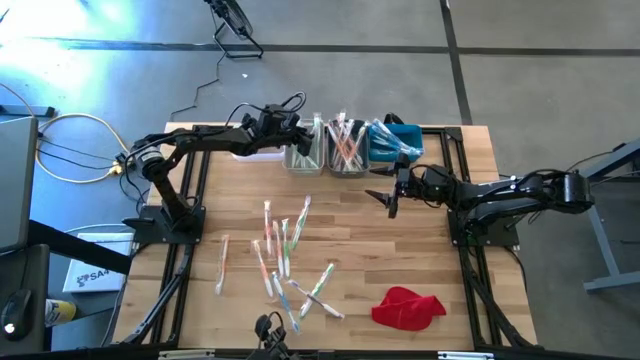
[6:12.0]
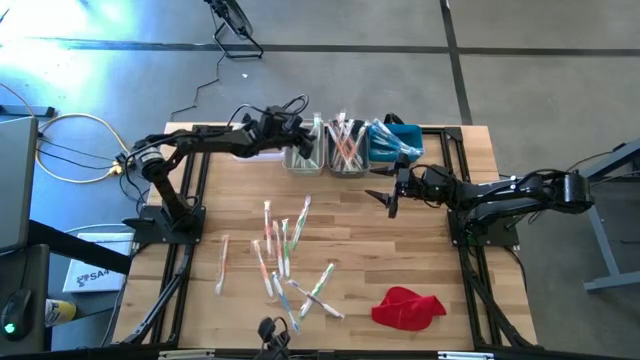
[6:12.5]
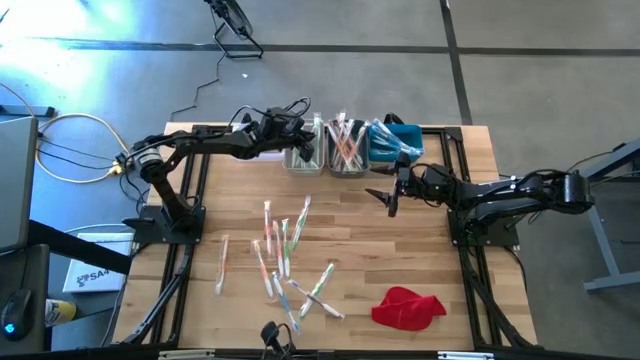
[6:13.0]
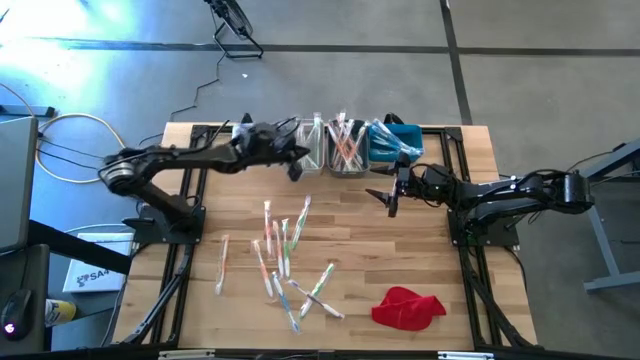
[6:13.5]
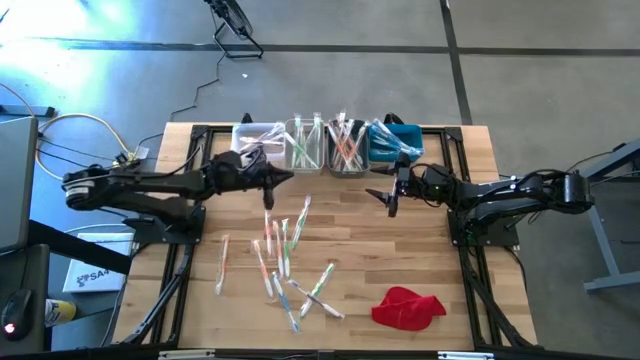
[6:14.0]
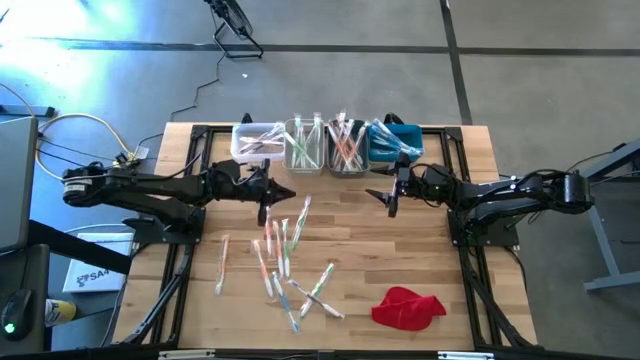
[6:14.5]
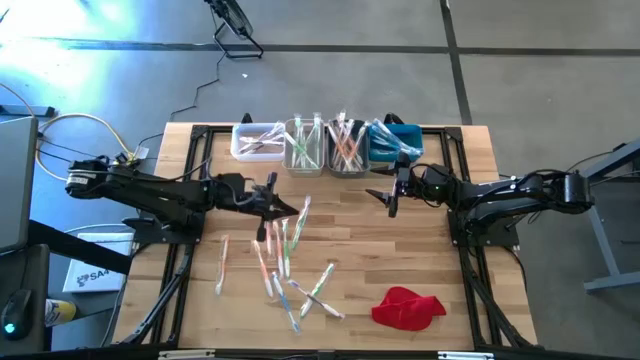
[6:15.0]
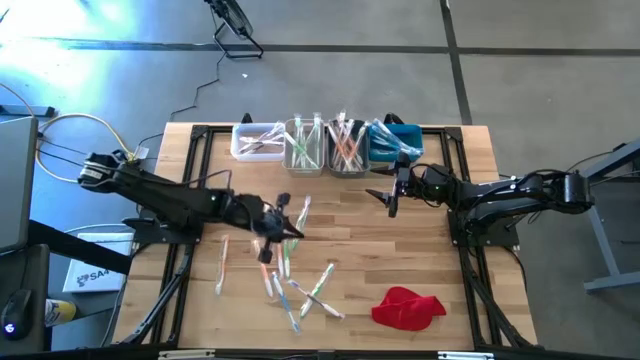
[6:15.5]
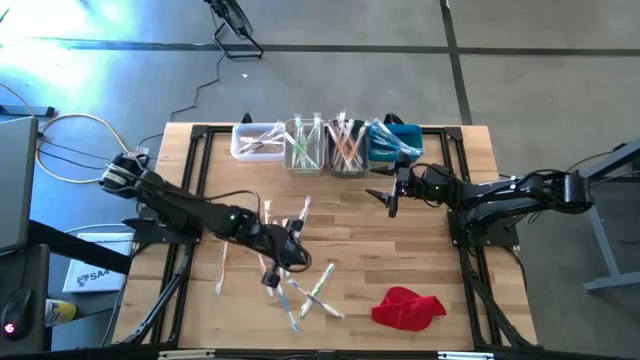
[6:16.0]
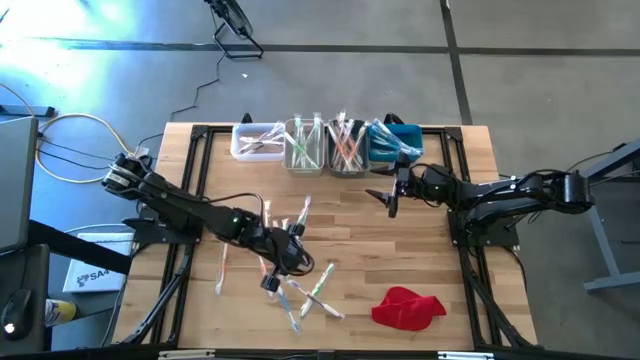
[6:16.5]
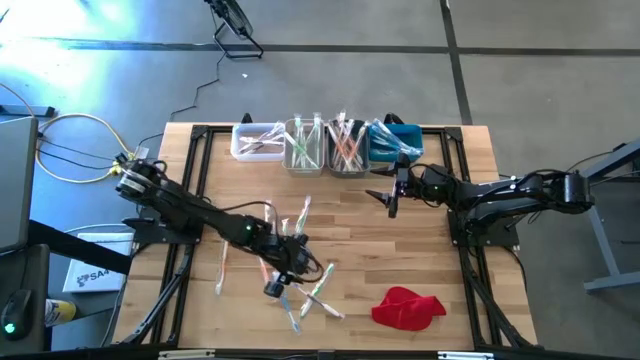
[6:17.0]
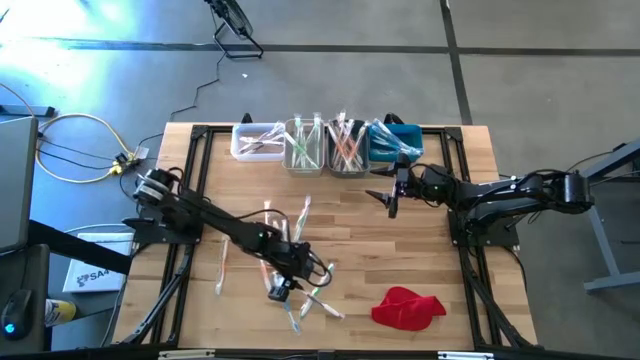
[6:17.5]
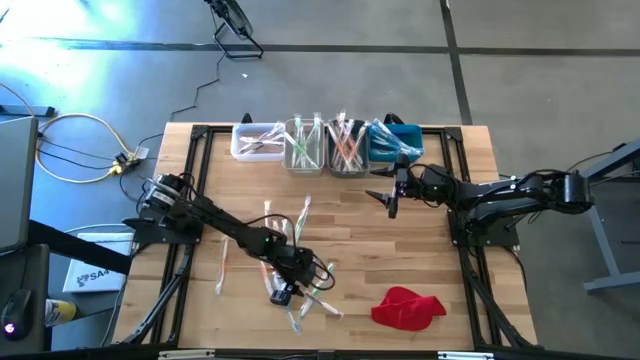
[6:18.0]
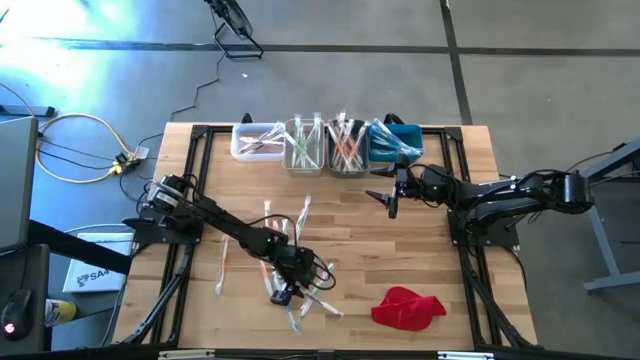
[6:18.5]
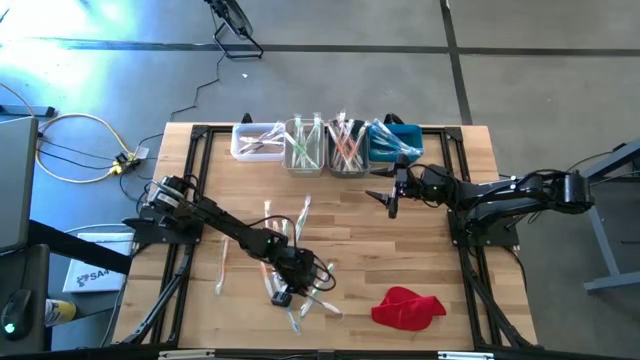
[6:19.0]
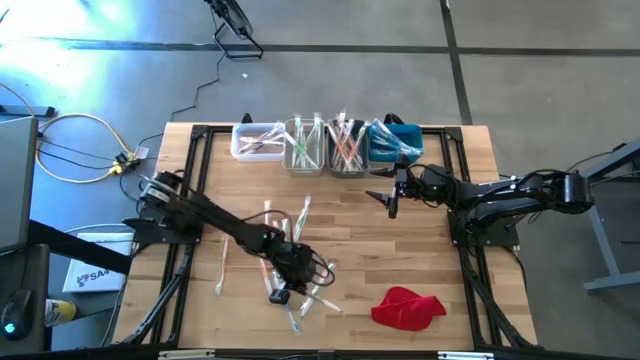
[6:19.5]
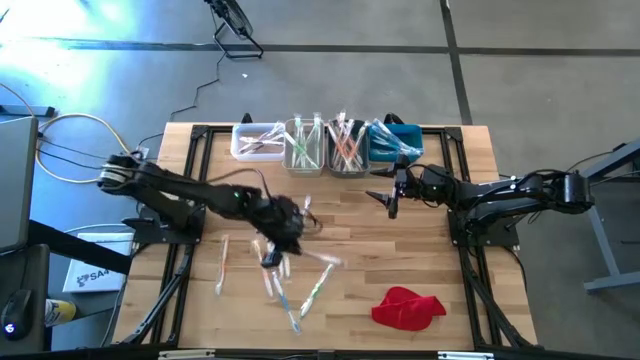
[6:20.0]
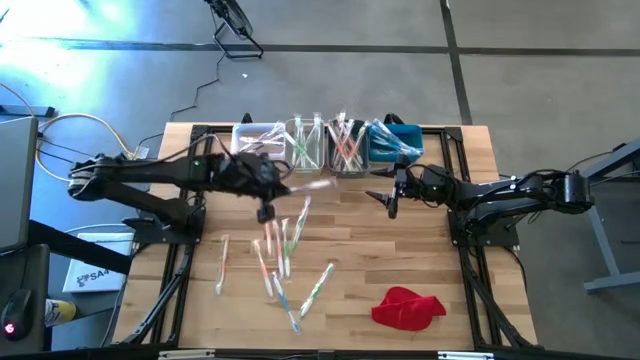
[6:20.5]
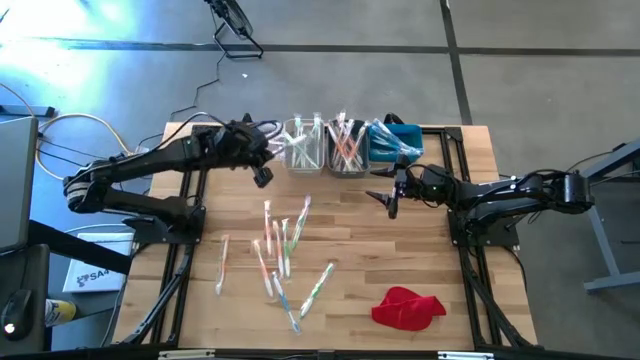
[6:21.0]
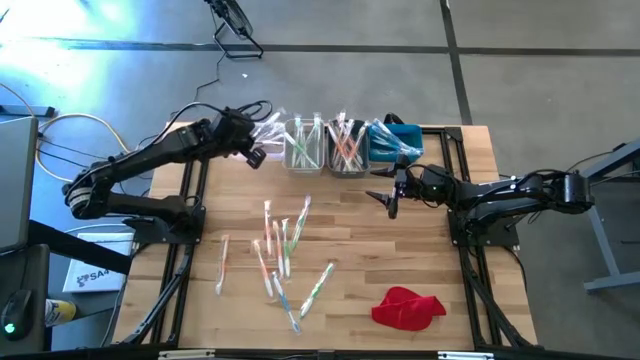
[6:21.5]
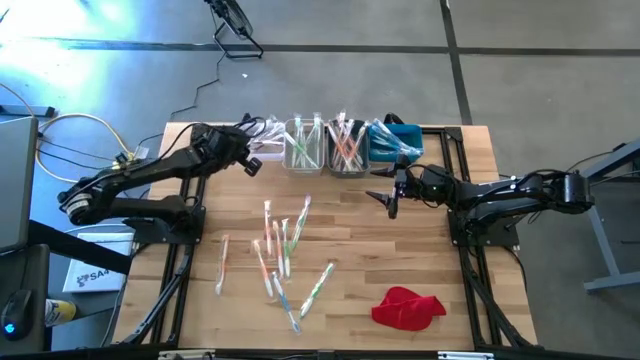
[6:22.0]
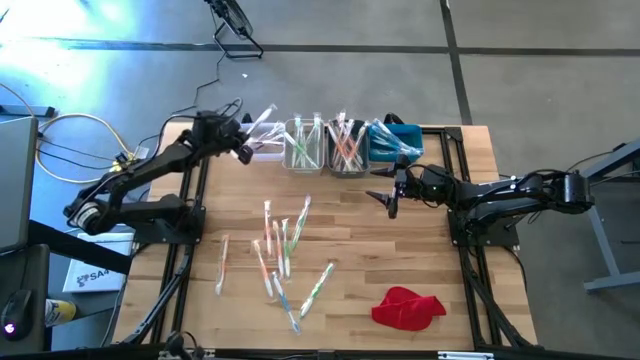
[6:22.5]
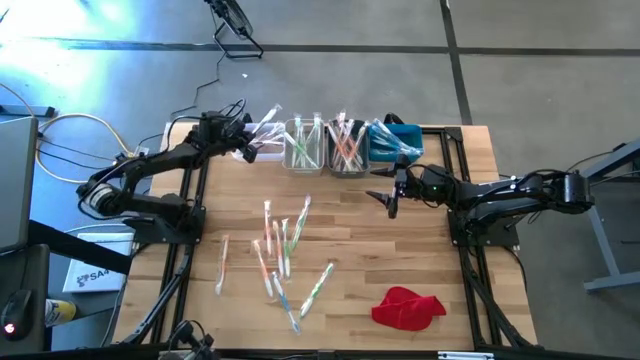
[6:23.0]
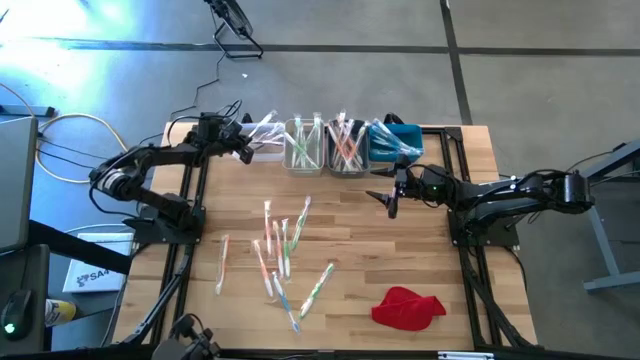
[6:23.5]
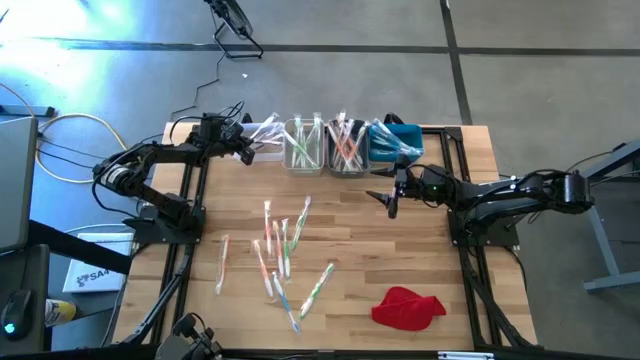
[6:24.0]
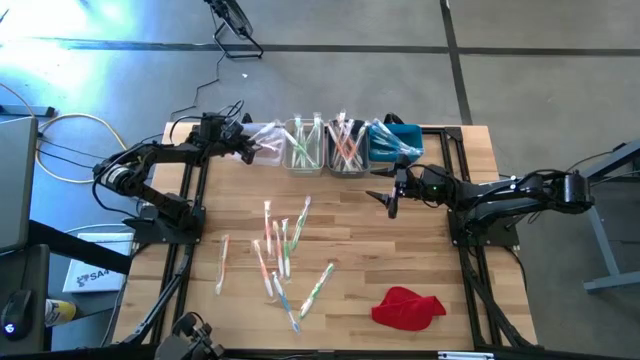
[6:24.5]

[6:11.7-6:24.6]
Task: Pick & Place Toothbrushes
Put the purple toothbrush into the transparent bin

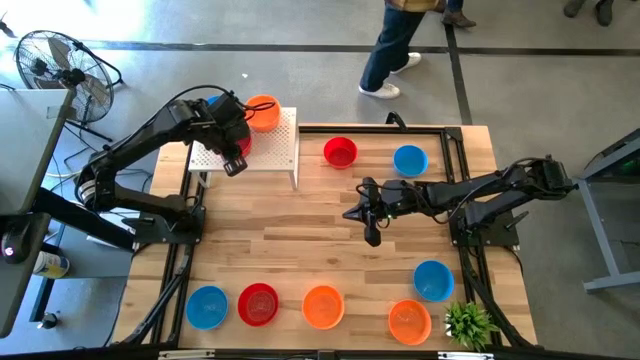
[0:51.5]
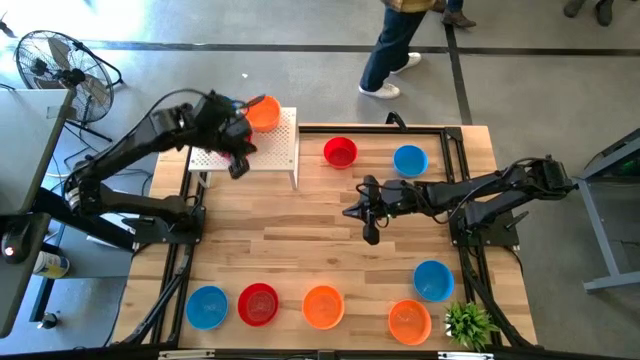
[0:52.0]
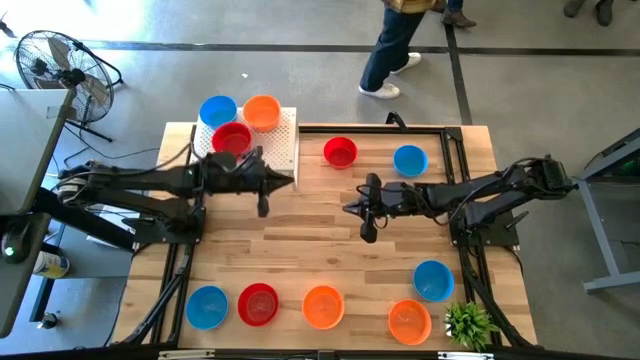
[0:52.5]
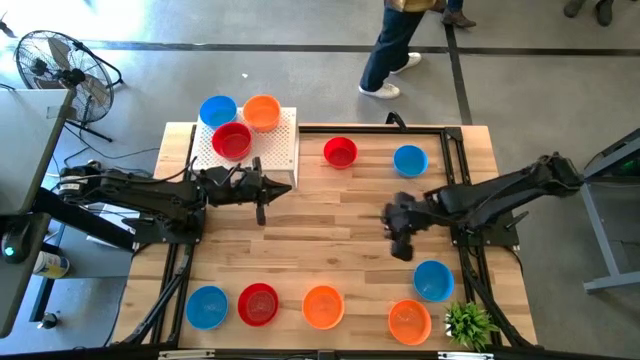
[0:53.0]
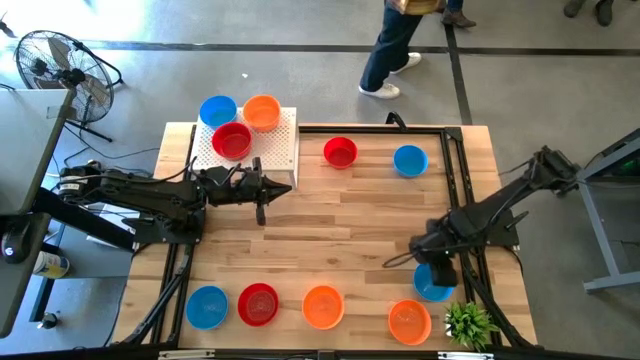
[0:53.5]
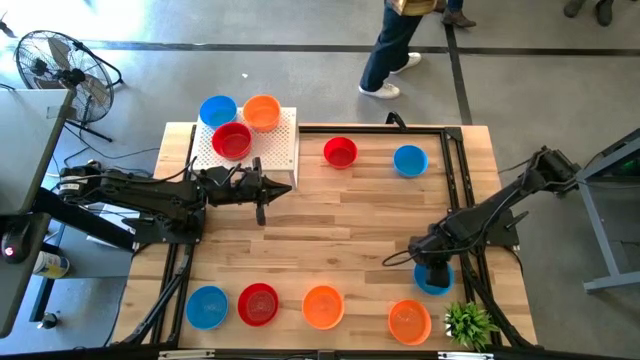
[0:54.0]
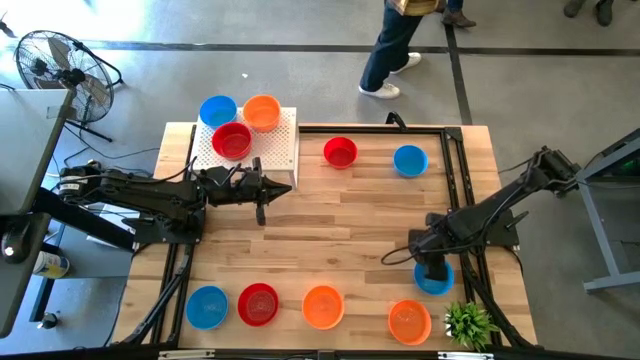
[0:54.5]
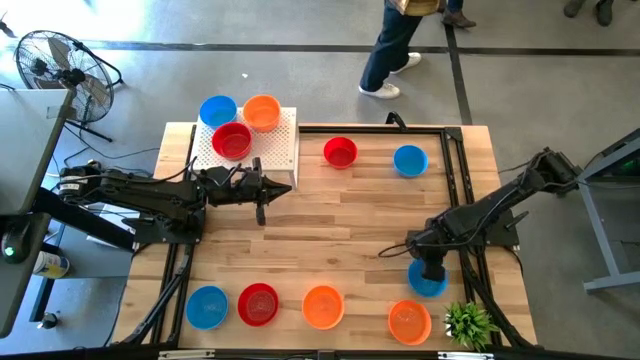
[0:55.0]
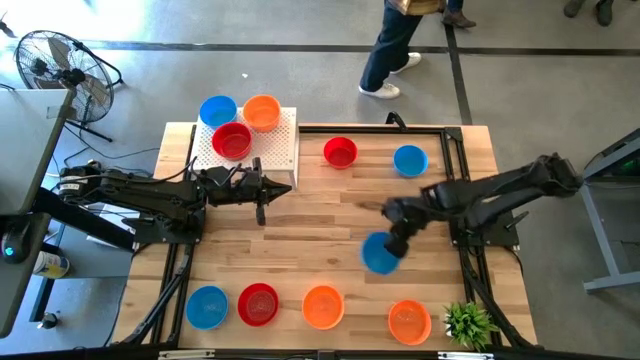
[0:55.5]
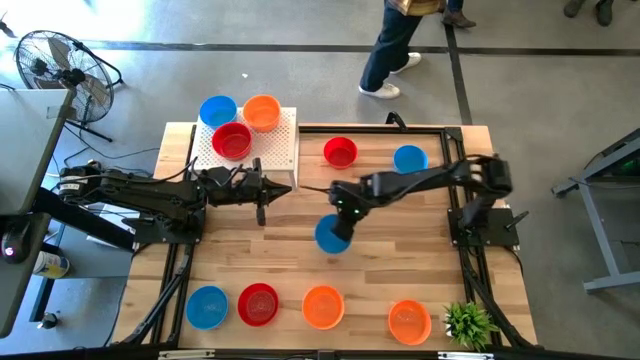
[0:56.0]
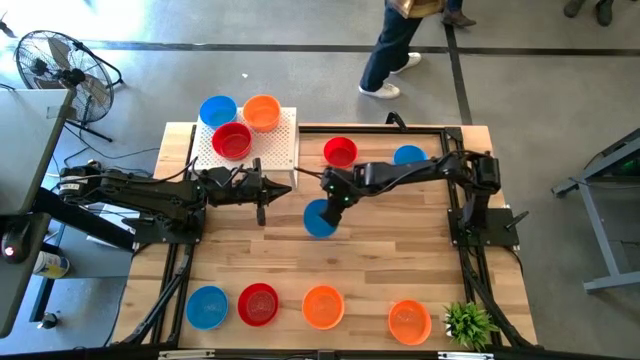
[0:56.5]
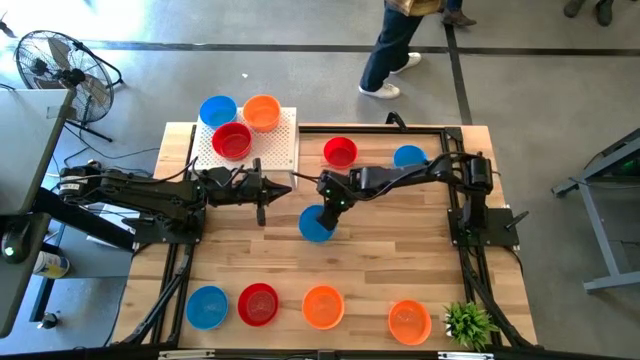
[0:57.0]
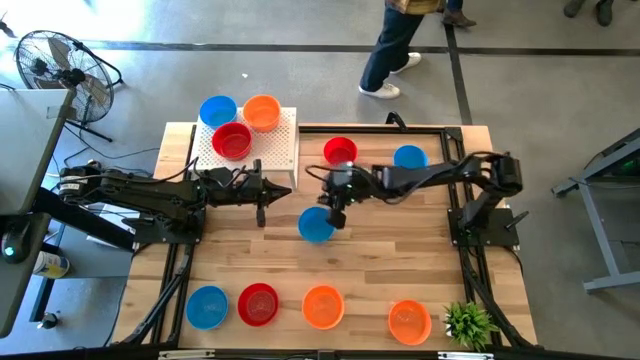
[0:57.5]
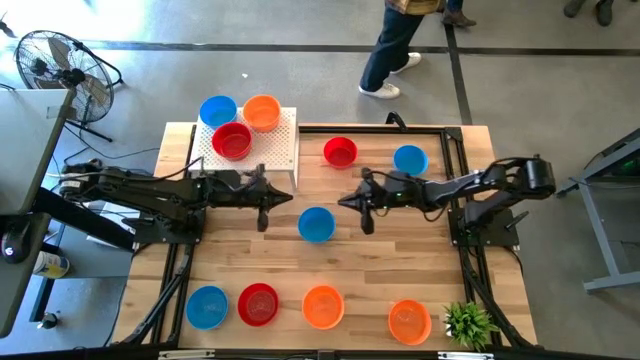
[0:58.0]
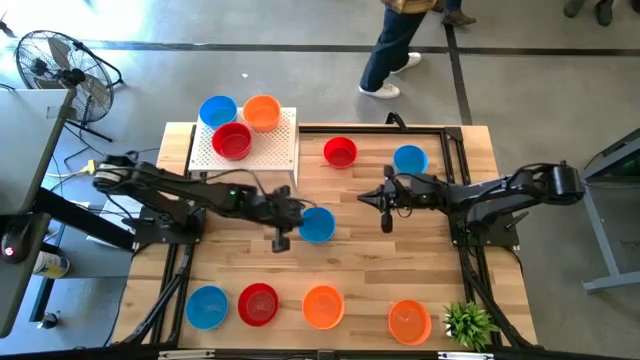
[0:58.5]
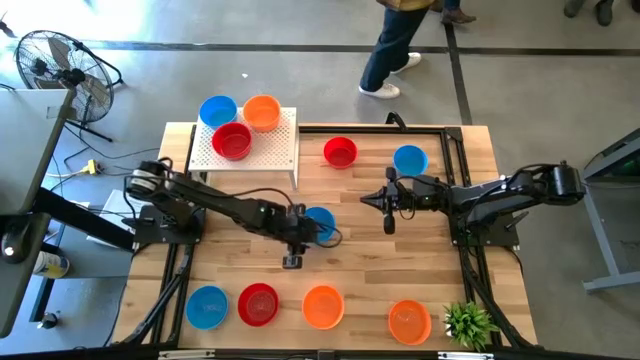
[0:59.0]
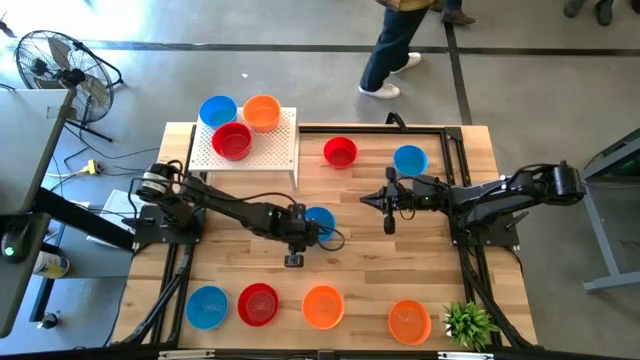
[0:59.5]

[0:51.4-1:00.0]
Task: Pick & Place Mini bowls
Stack the blue bowl on top of the blue bowl on the shelf
